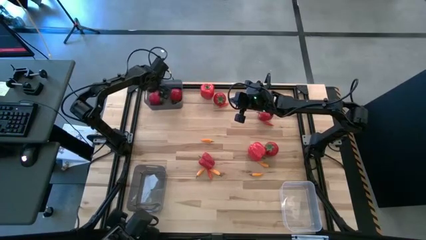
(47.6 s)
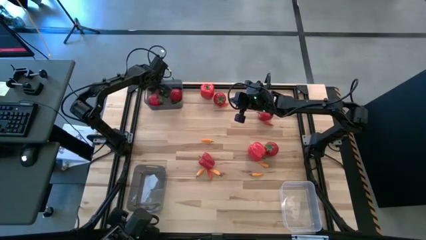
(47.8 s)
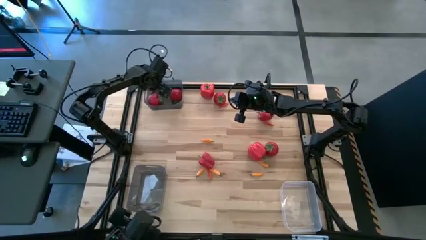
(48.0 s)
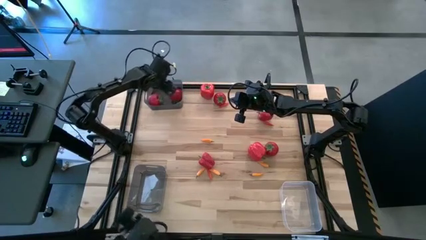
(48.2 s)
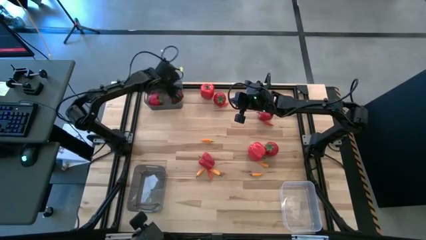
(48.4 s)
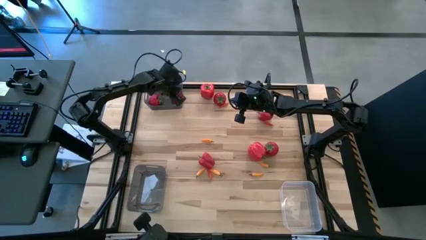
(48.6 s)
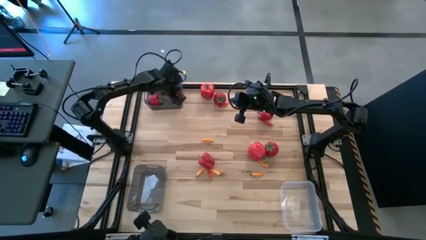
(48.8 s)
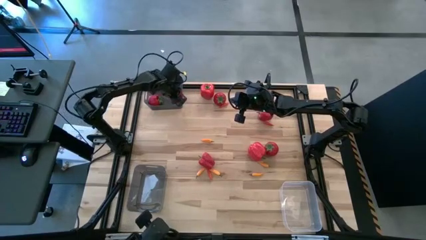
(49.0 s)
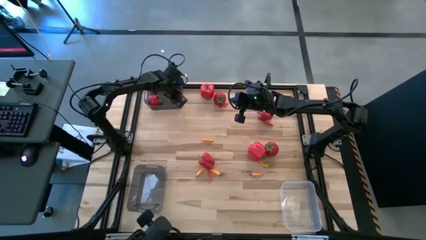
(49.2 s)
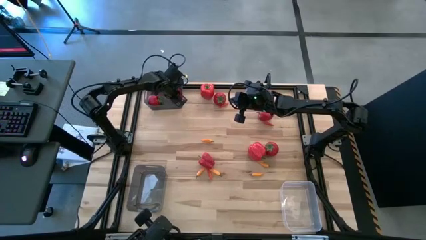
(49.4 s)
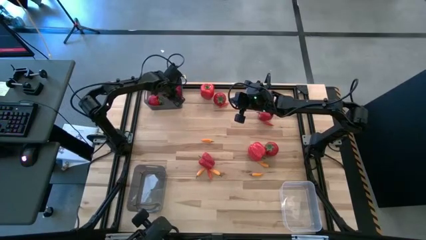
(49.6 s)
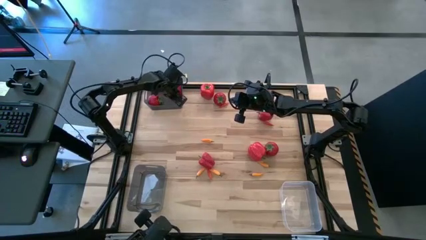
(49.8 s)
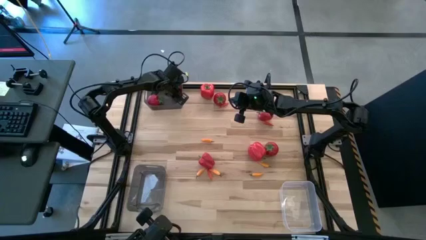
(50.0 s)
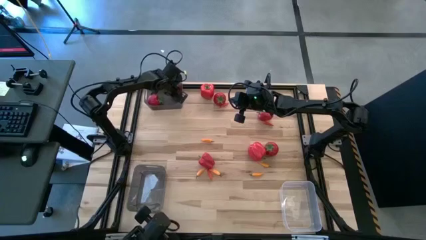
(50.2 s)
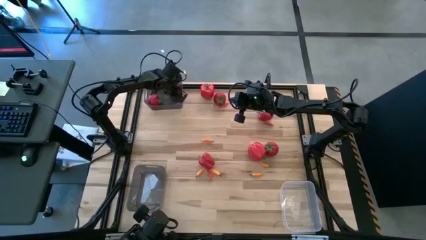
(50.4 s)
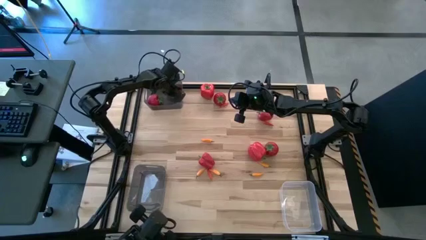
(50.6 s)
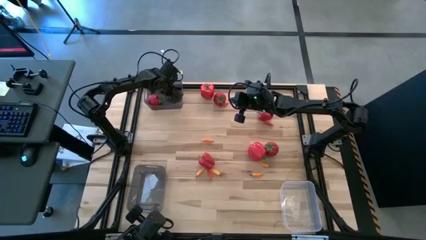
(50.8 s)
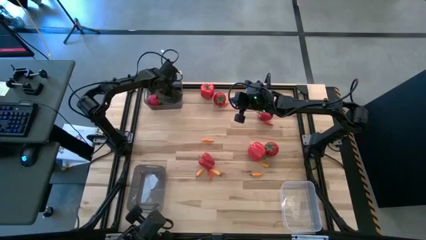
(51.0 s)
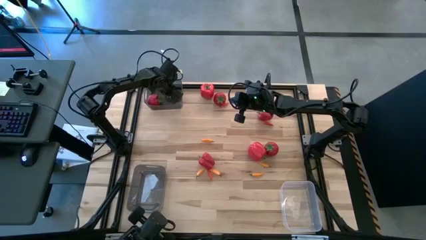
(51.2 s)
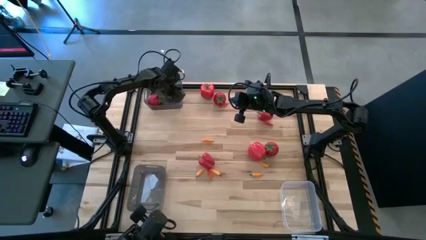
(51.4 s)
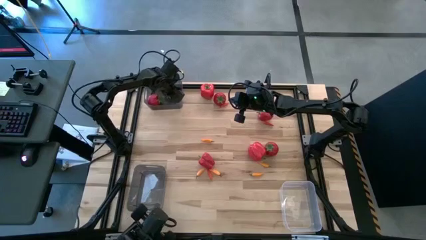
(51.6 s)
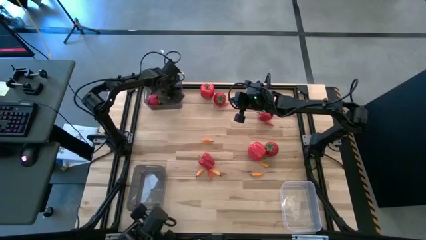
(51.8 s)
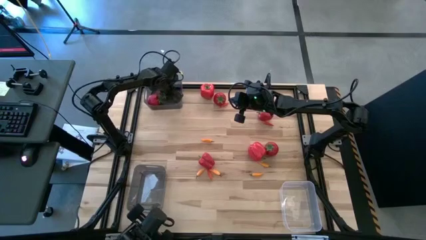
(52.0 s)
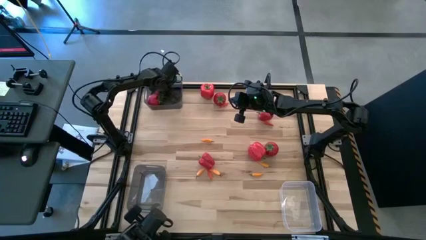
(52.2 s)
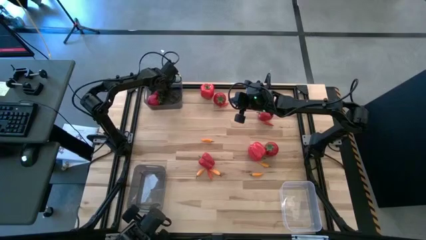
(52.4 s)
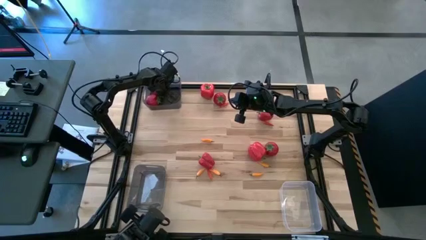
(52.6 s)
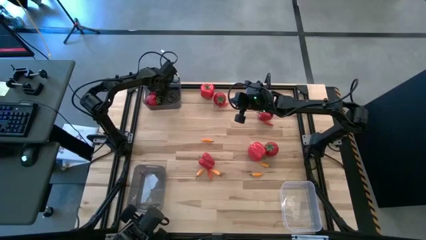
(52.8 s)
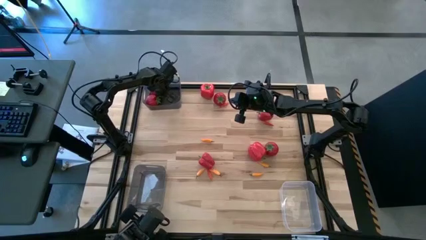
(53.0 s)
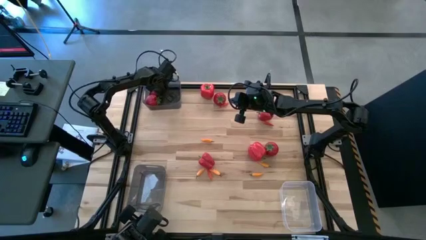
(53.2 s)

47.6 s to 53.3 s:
Task: Sort produce into baskets
Adjust the red tomato in the top black bin

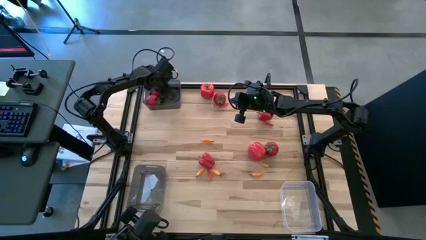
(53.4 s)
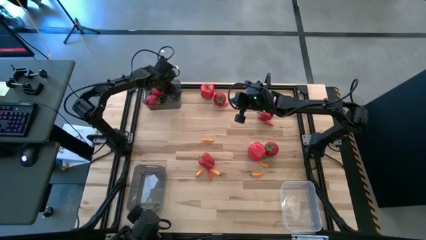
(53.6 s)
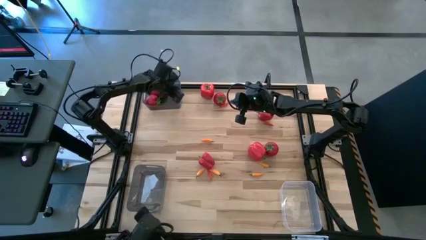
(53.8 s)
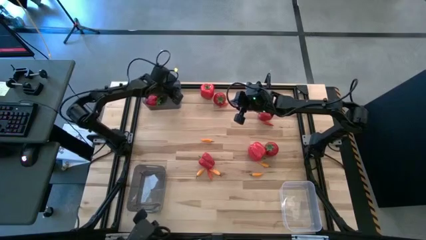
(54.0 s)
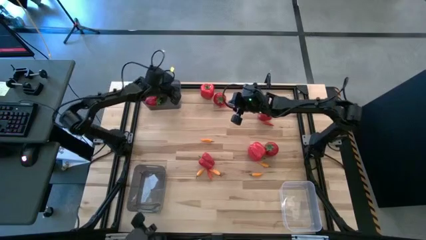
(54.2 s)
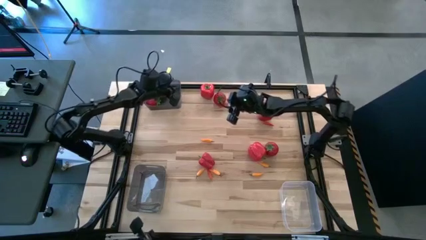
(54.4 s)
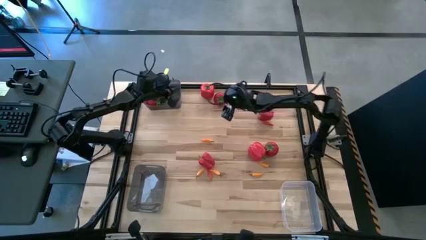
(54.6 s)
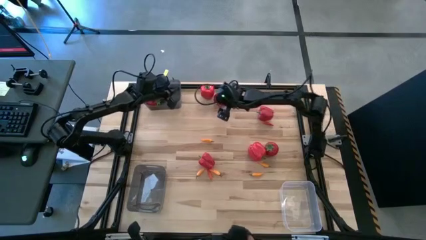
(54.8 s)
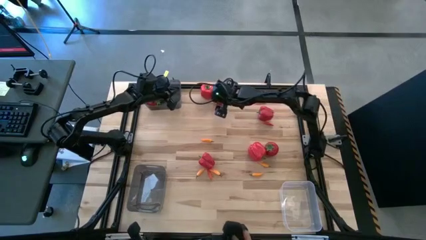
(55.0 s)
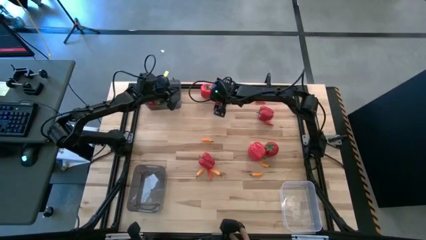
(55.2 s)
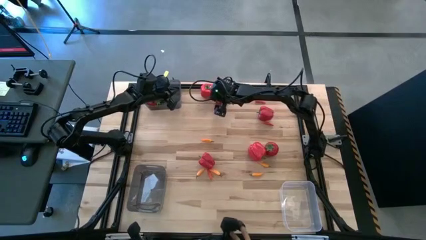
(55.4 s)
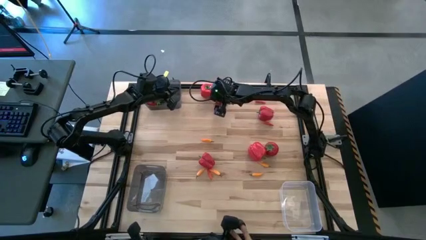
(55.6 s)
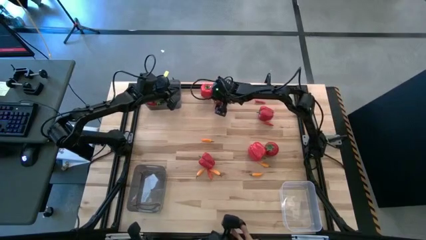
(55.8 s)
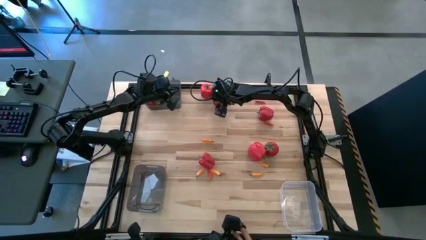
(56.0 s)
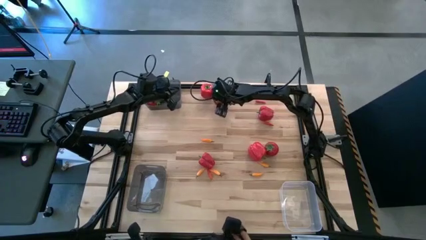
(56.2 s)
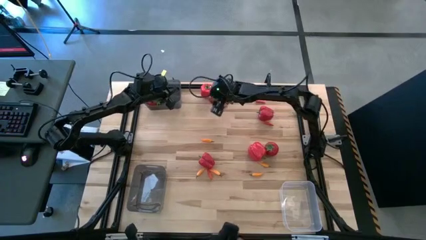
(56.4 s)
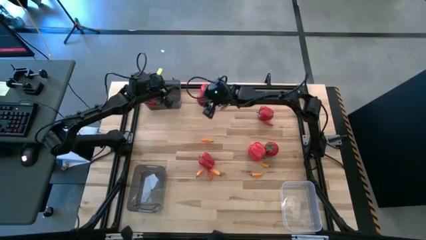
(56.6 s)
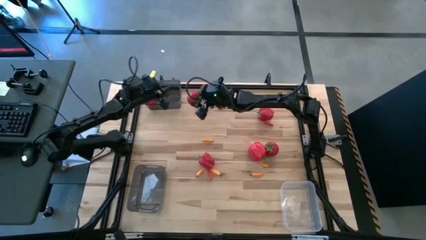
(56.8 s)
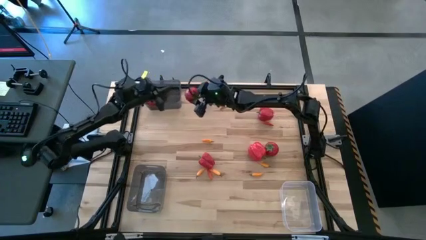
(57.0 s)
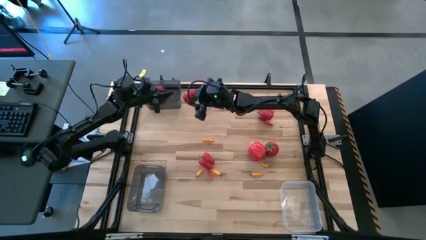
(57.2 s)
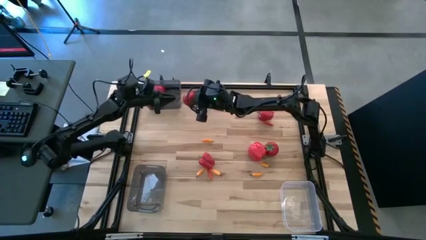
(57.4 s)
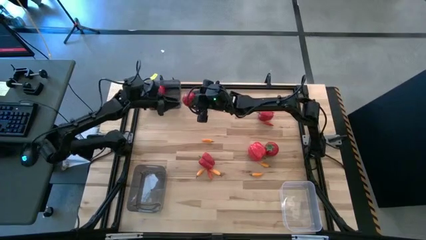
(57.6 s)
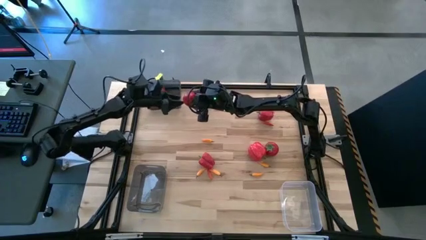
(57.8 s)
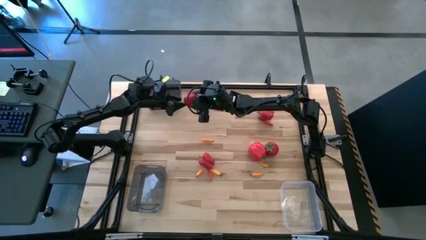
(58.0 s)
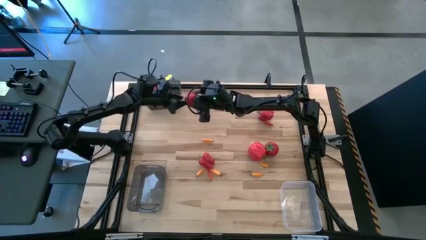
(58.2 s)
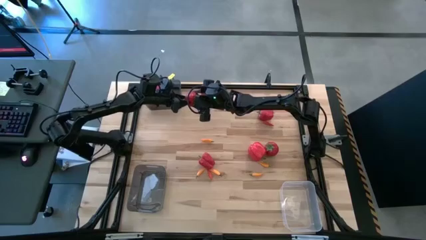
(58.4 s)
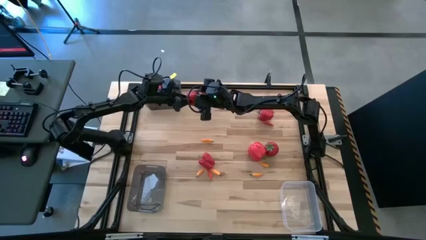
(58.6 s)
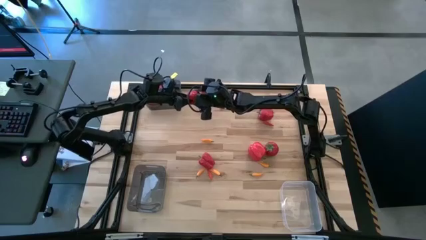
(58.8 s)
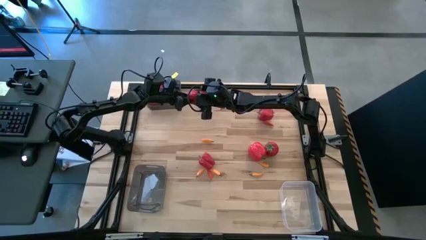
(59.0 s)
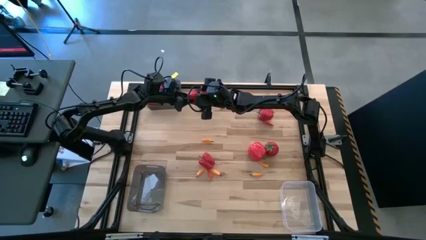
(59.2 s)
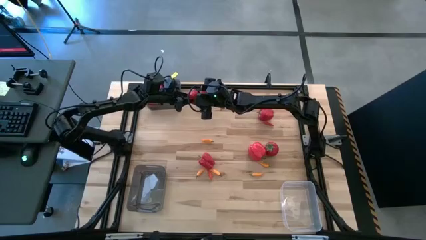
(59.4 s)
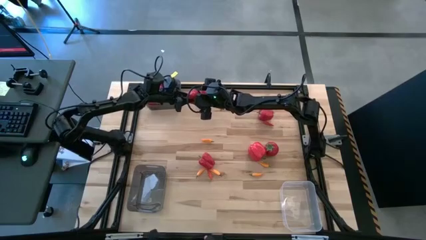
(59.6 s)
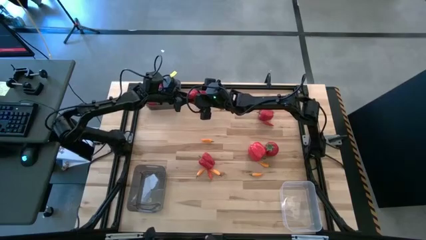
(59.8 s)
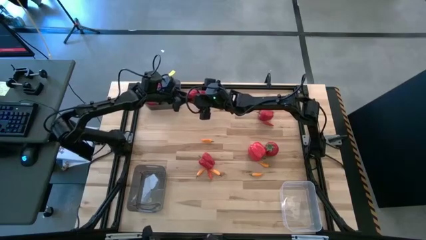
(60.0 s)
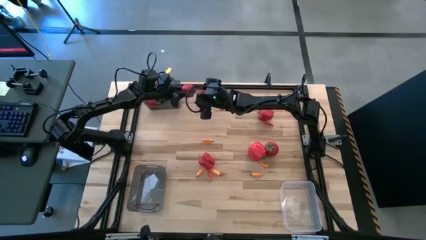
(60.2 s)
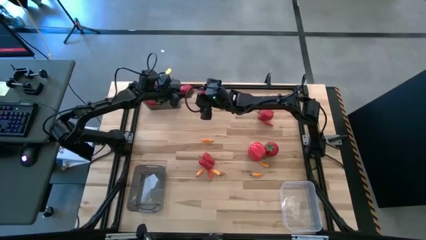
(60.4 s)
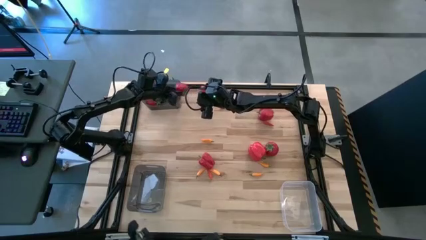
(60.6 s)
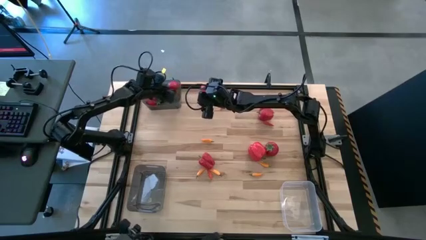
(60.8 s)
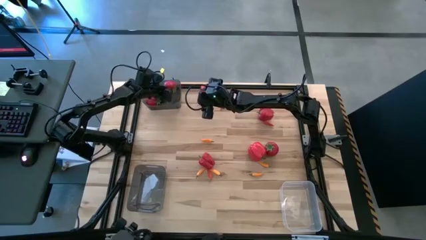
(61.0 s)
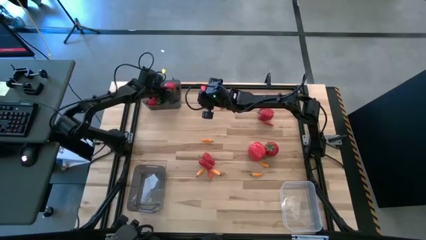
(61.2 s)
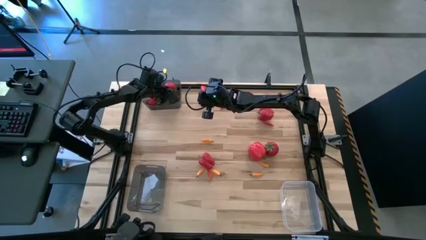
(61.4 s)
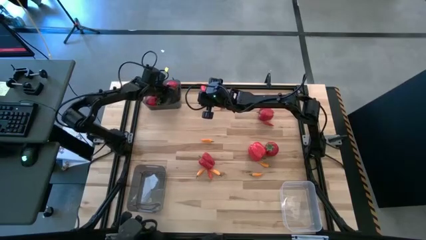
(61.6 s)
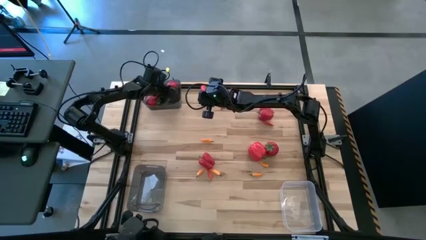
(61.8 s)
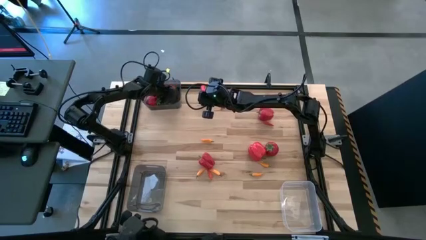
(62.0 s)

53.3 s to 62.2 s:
Put the red tomato into the top black bin
